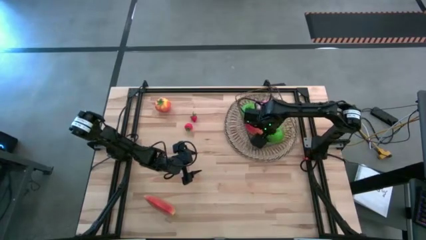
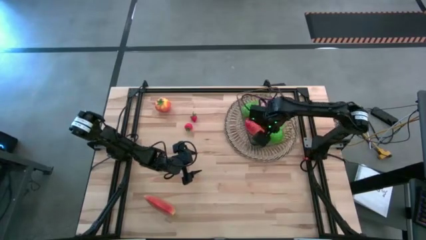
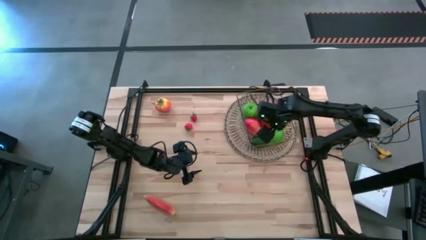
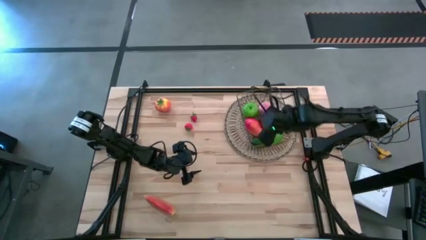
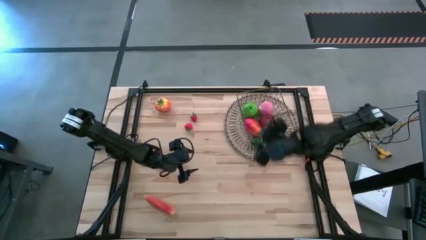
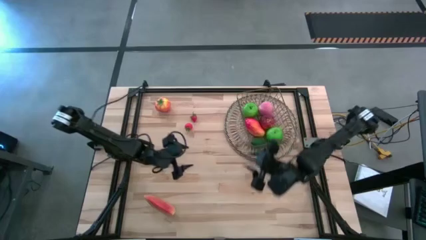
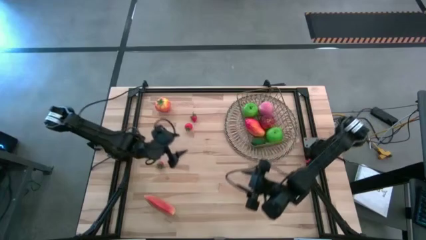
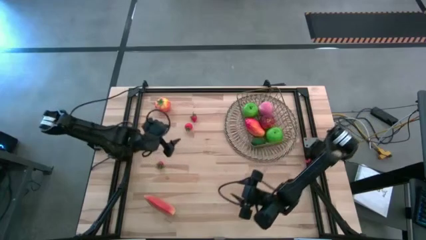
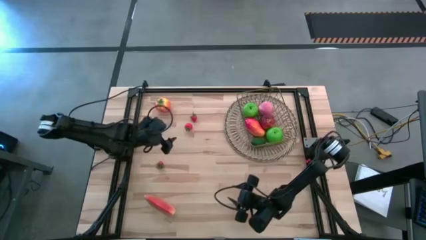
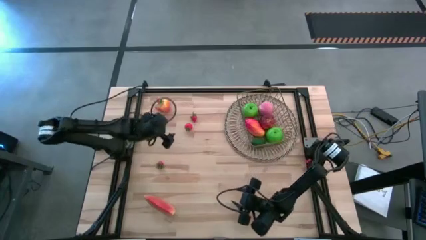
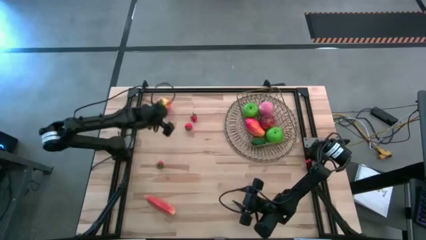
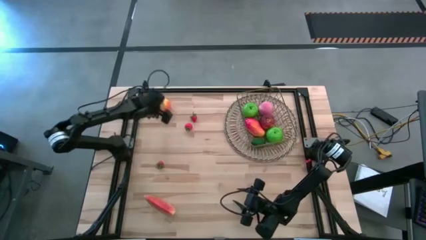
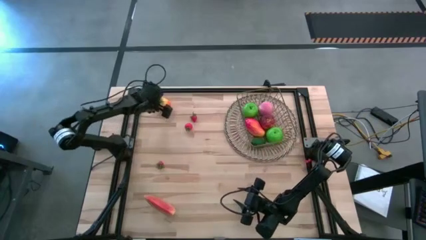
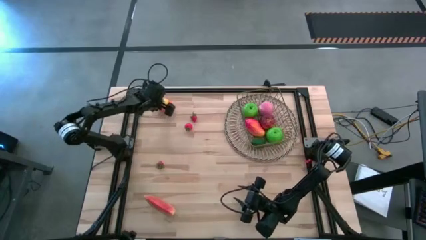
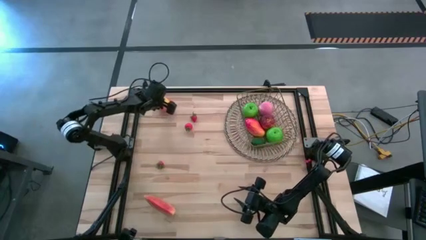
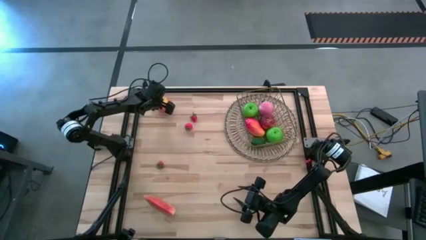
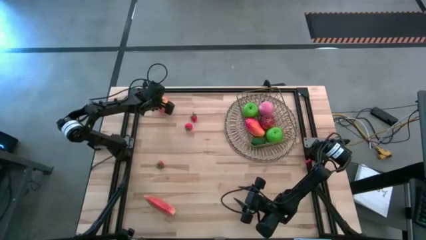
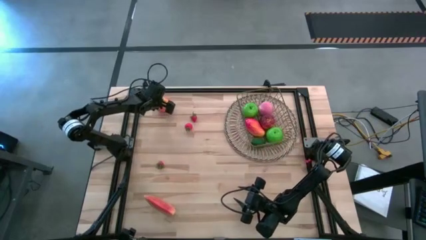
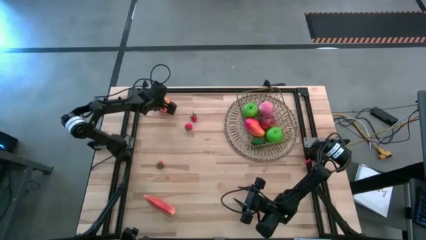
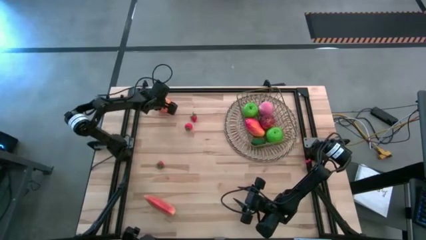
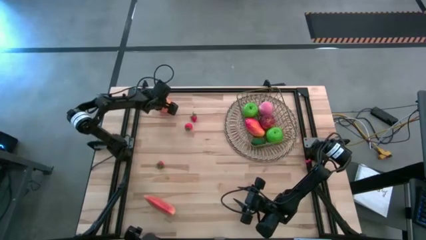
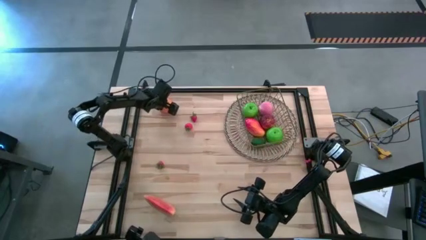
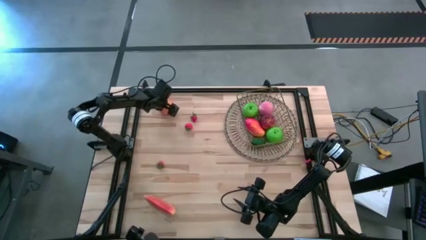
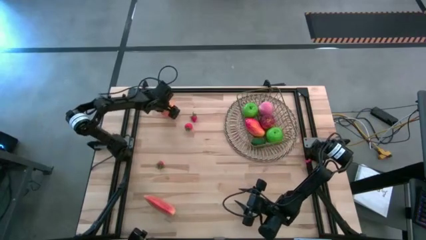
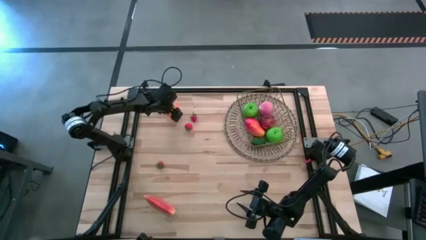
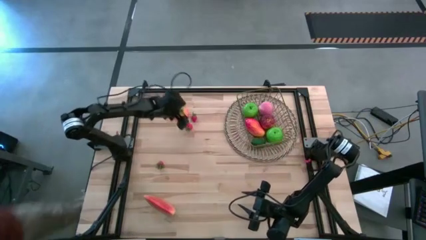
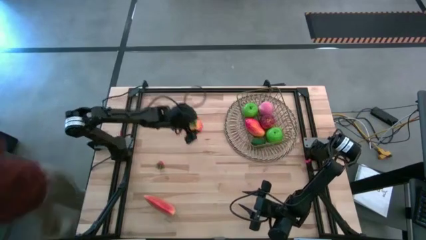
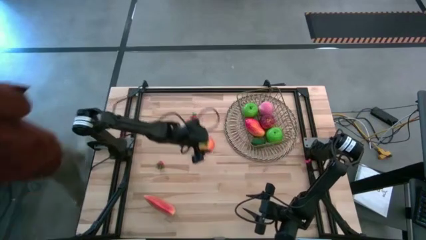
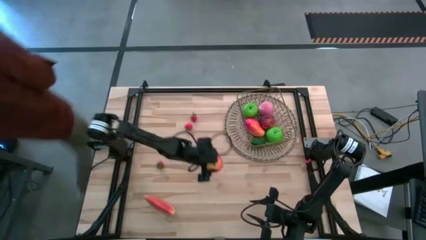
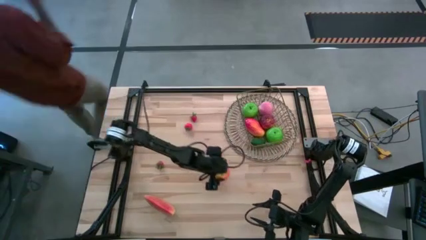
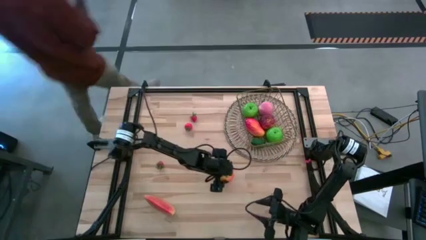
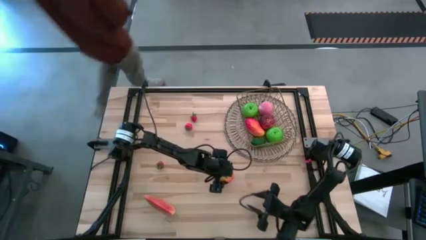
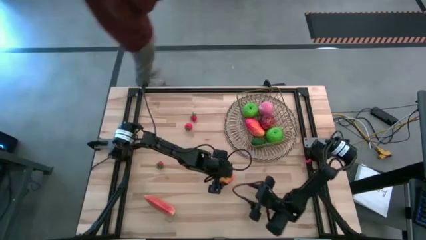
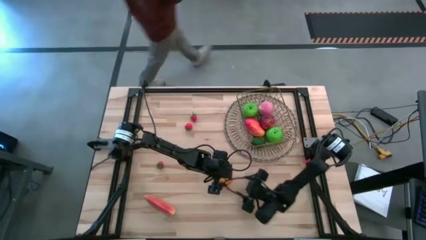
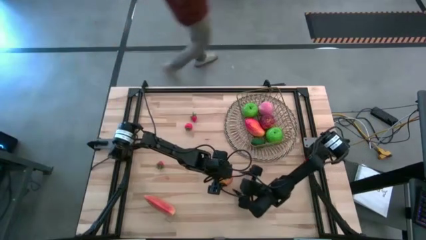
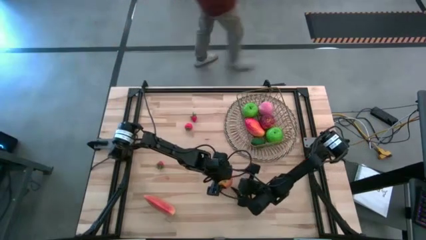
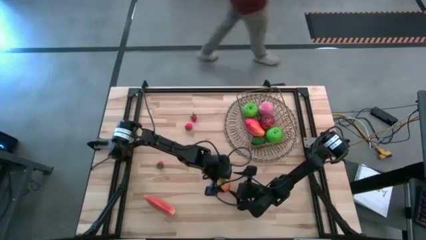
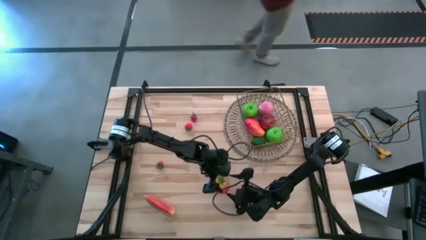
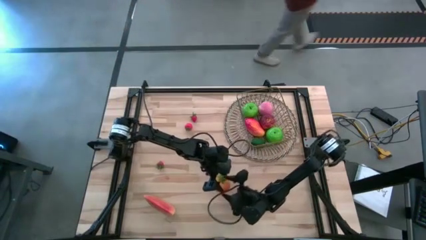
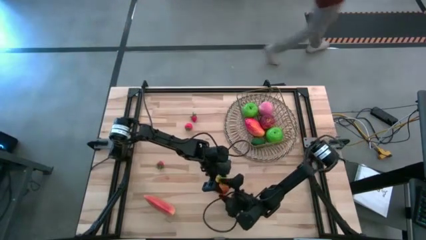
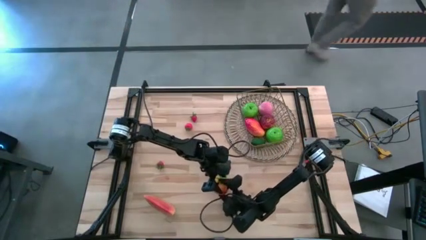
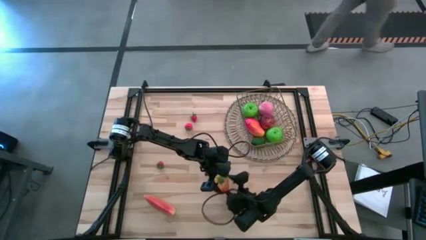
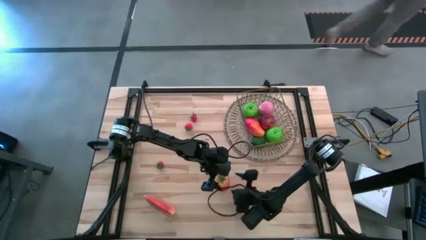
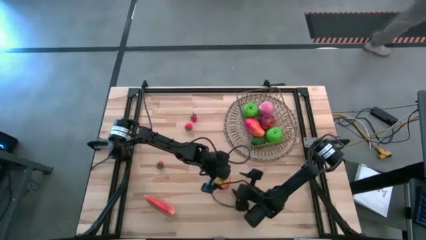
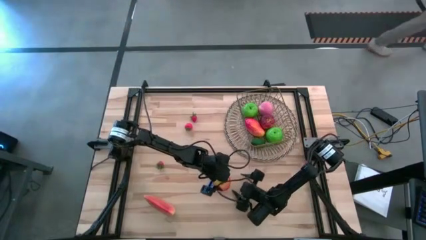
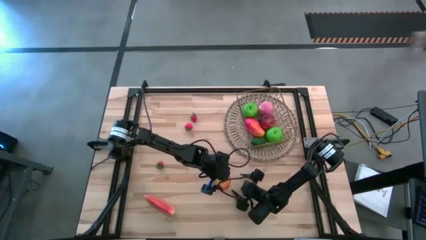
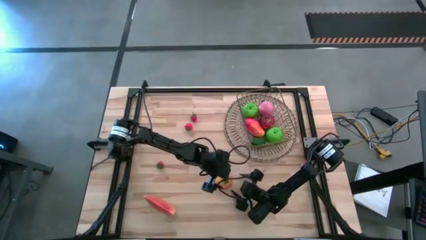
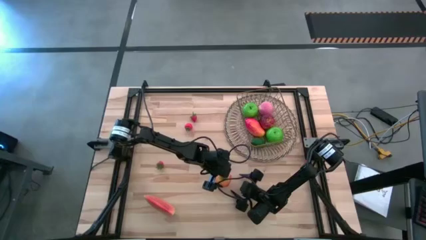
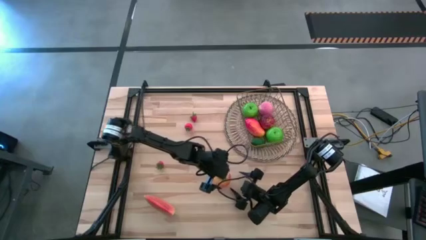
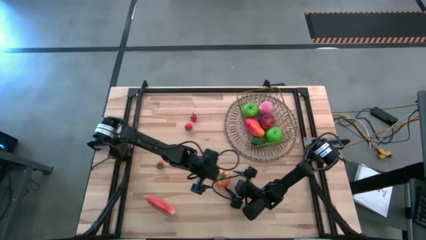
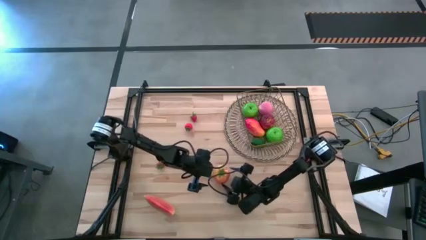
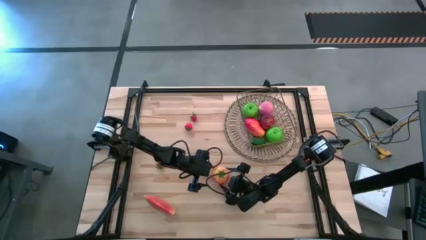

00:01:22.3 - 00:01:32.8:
Task: Build produce basket
Put the persimmon into the gold wire basket
